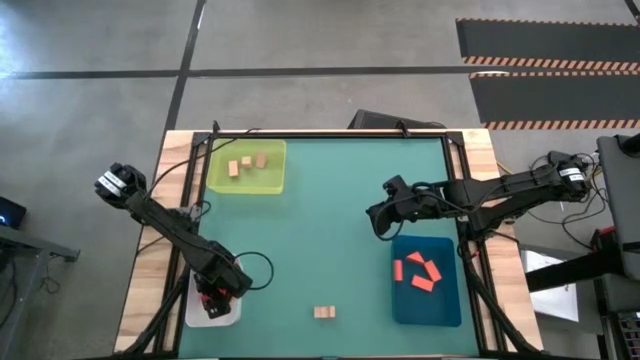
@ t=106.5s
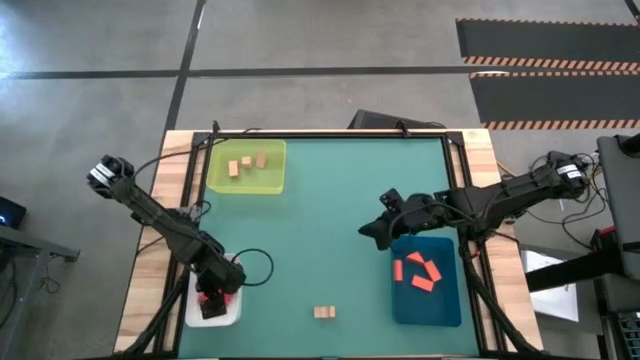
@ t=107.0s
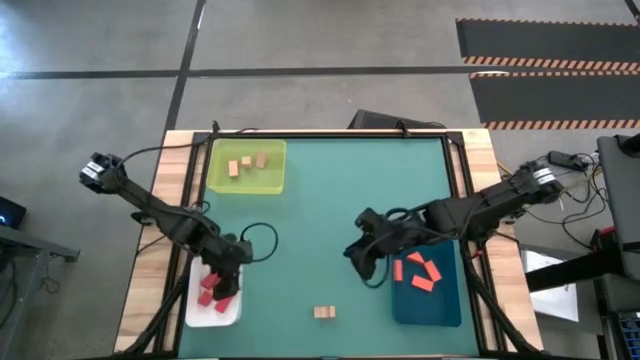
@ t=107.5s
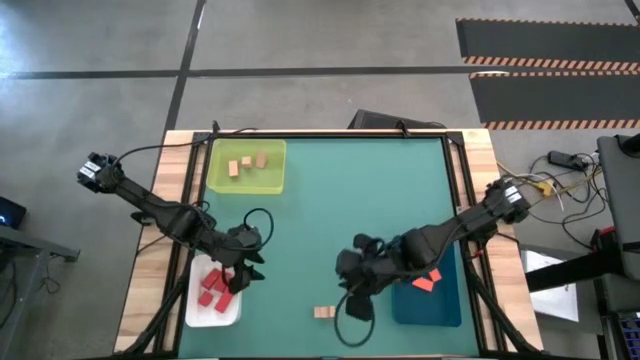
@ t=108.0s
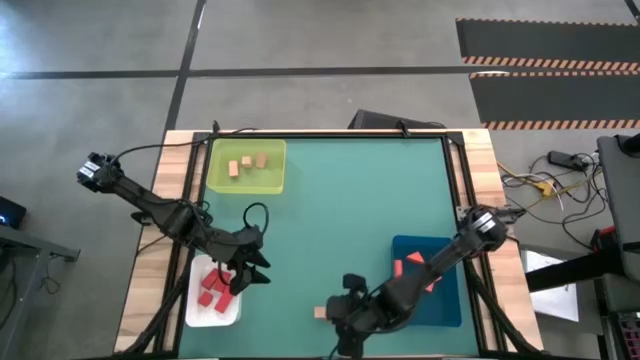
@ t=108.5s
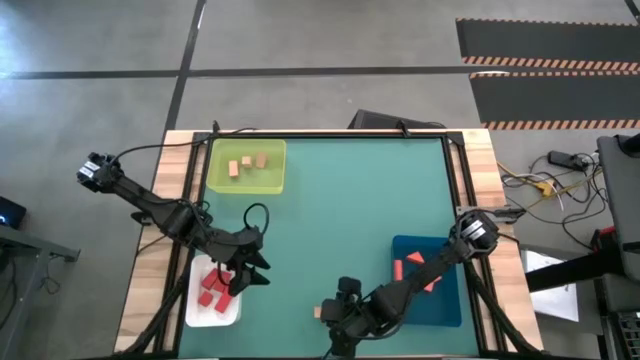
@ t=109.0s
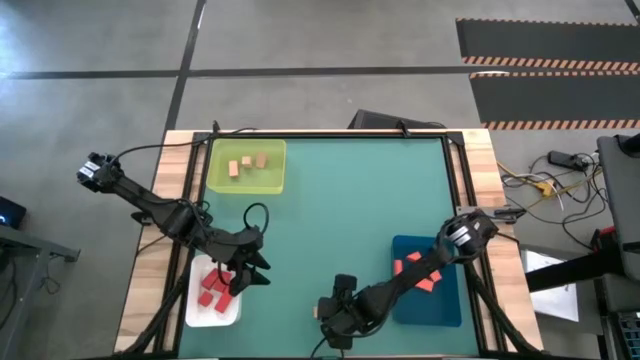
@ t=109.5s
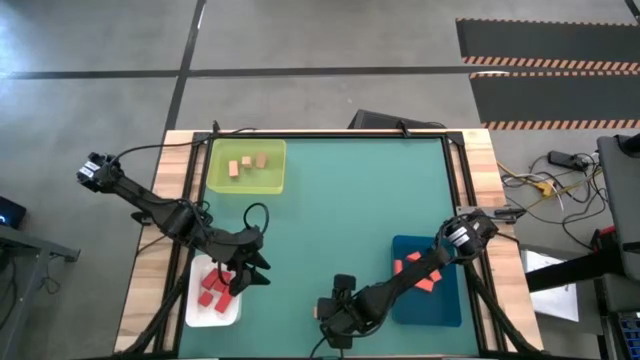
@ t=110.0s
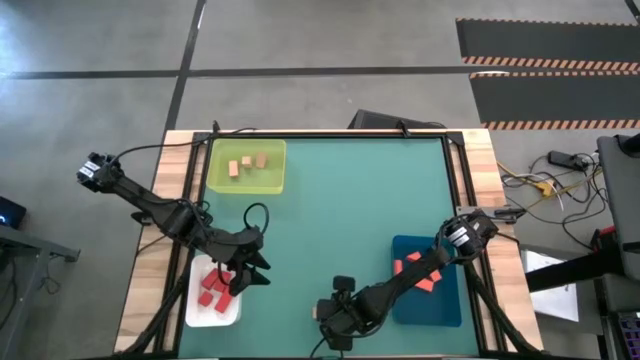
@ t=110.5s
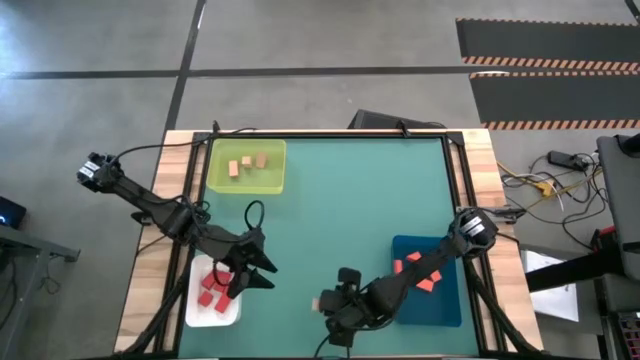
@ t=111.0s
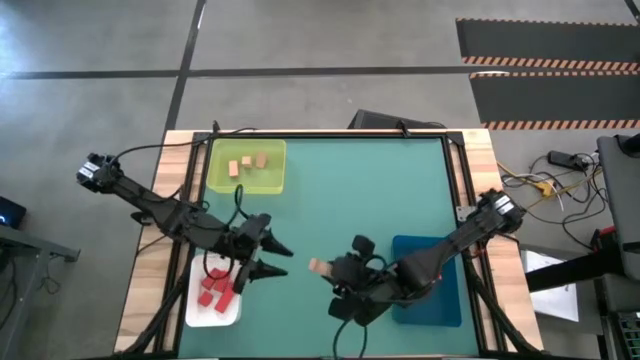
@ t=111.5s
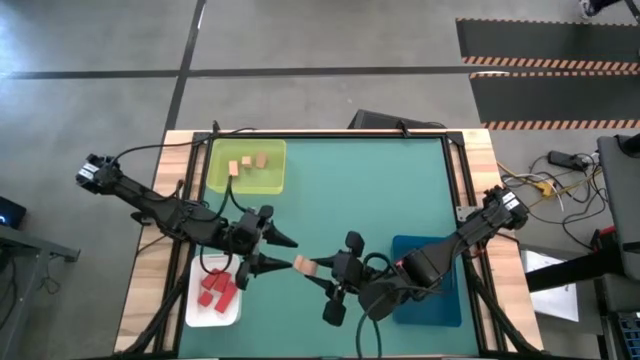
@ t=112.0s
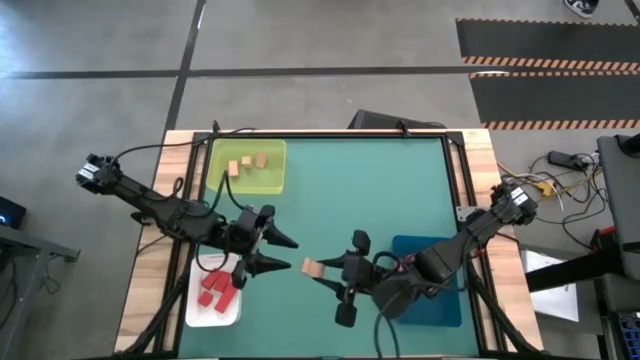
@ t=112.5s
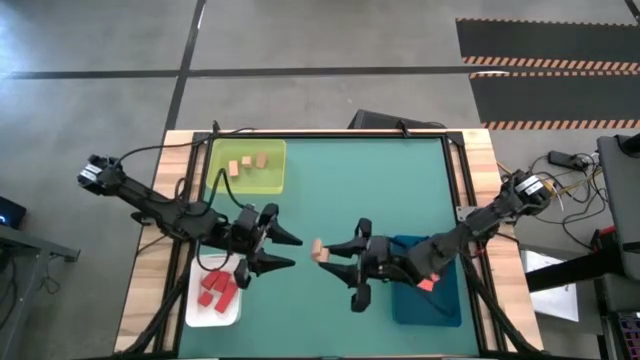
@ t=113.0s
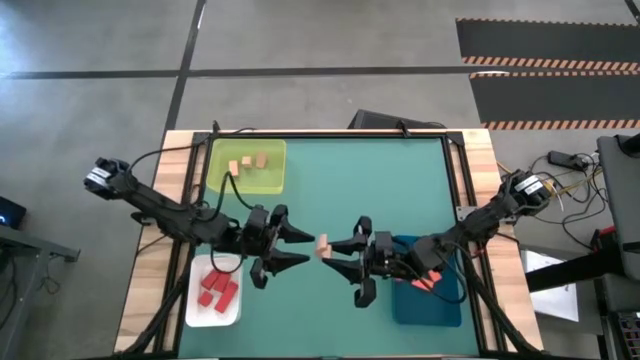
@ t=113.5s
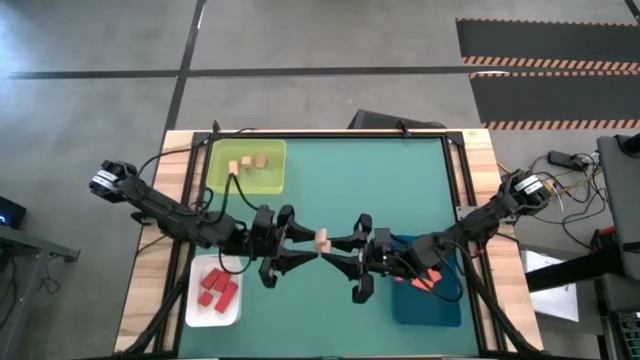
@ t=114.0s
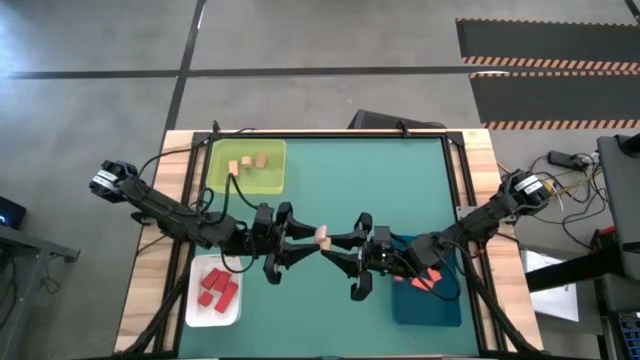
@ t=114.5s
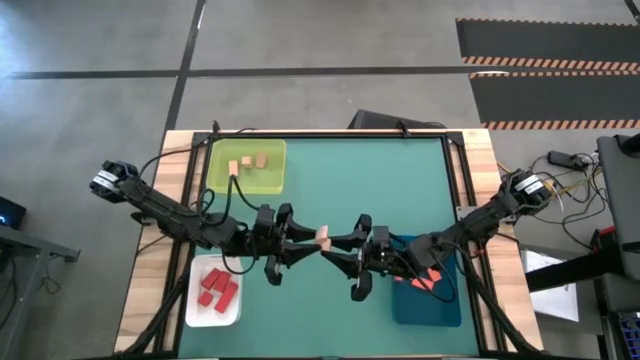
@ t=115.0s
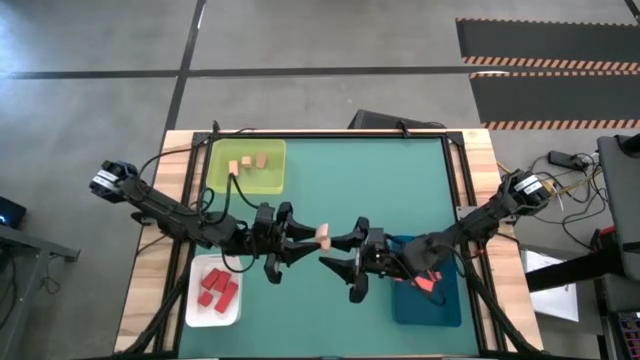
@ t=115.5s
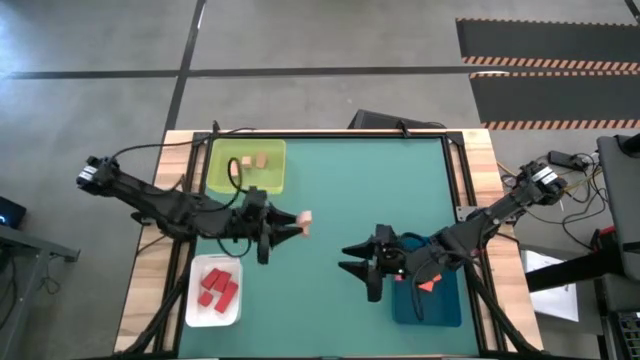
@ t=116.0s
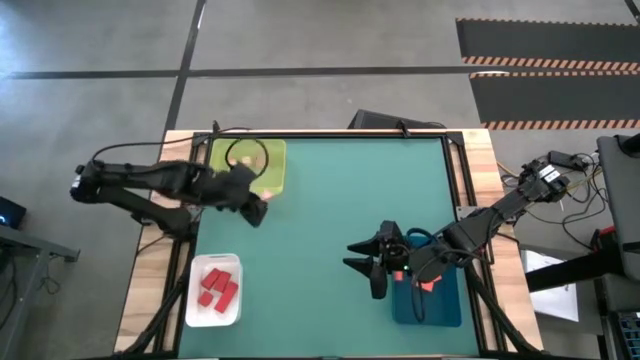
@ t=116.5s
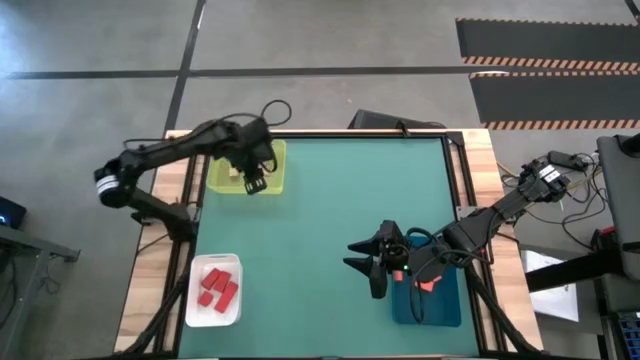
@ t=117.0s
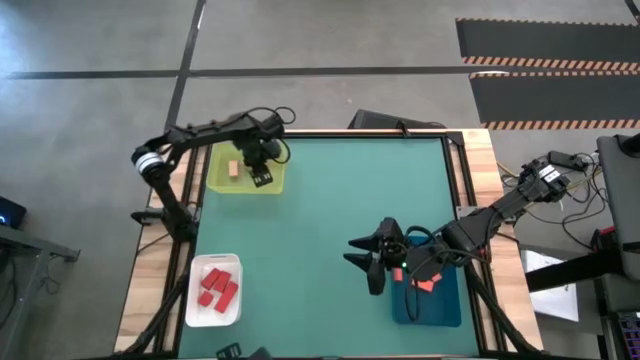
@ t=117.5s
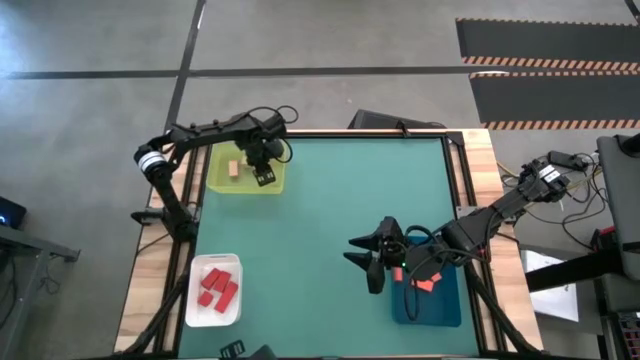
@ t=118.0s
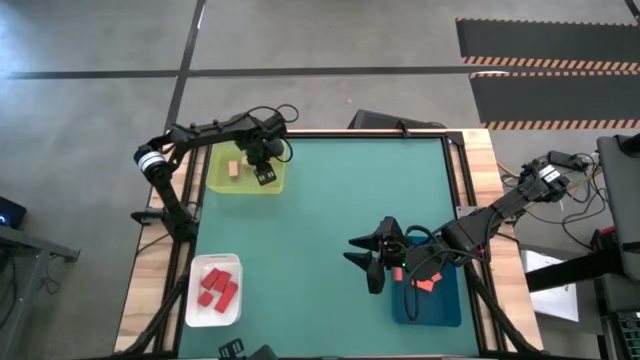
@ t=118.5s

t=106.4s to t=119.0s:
Task: Sort & place blocks by color
Put the light brown into the yellow bin

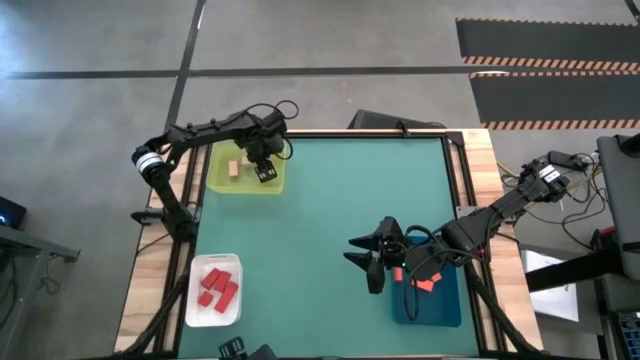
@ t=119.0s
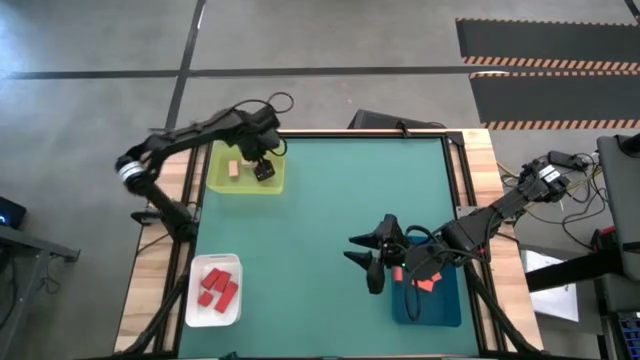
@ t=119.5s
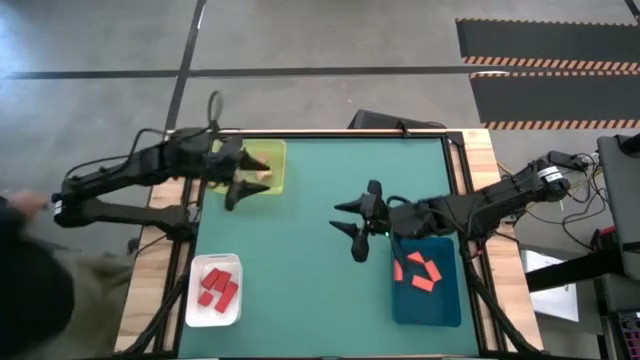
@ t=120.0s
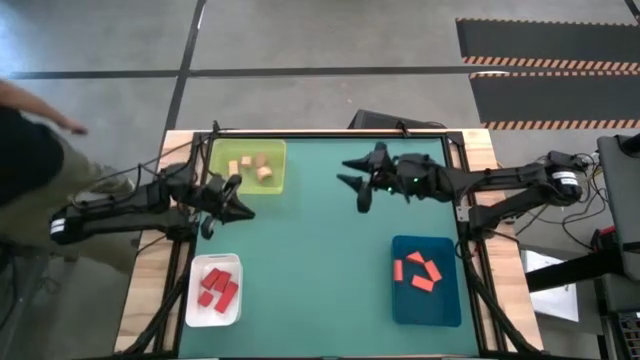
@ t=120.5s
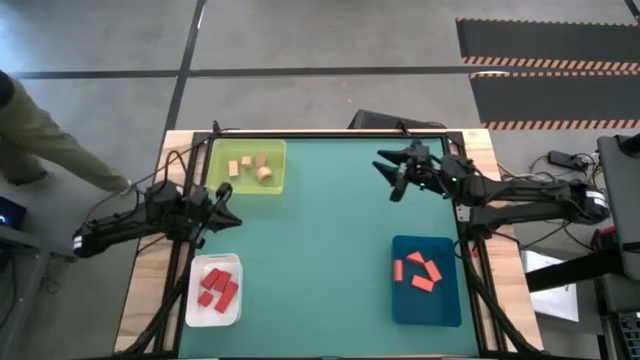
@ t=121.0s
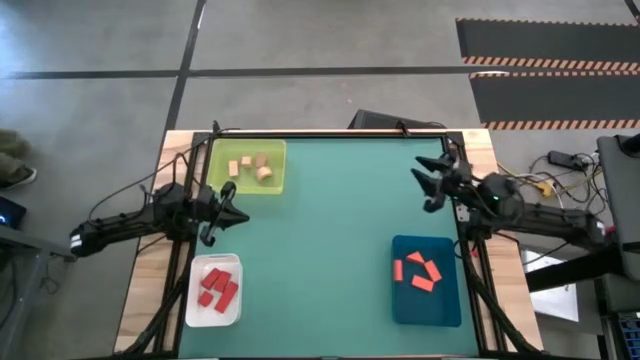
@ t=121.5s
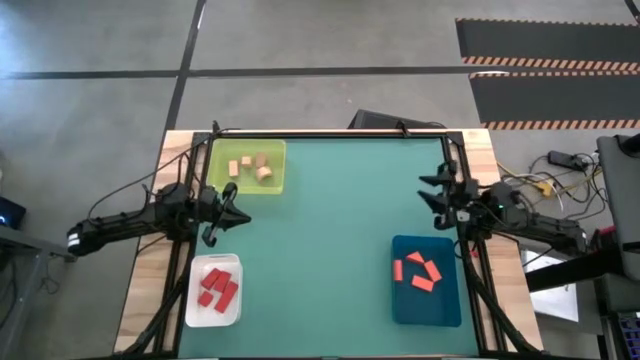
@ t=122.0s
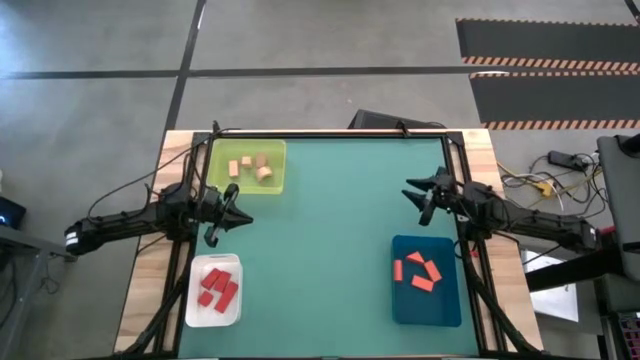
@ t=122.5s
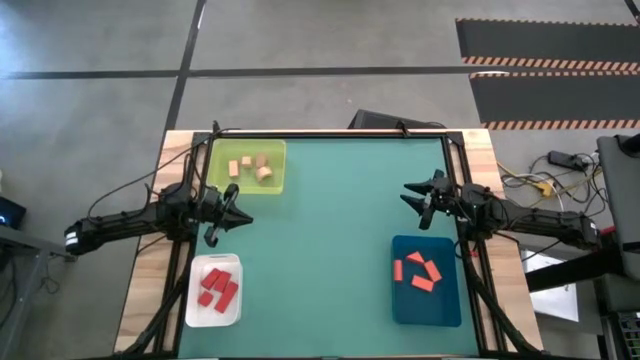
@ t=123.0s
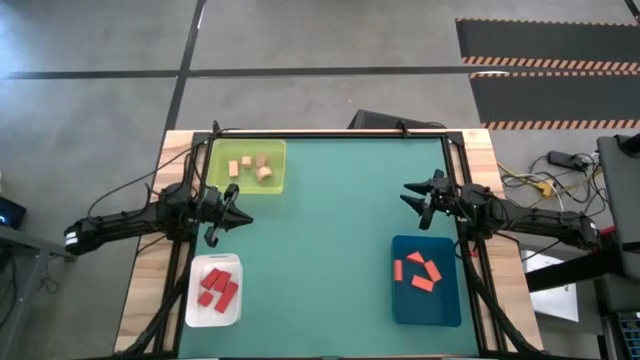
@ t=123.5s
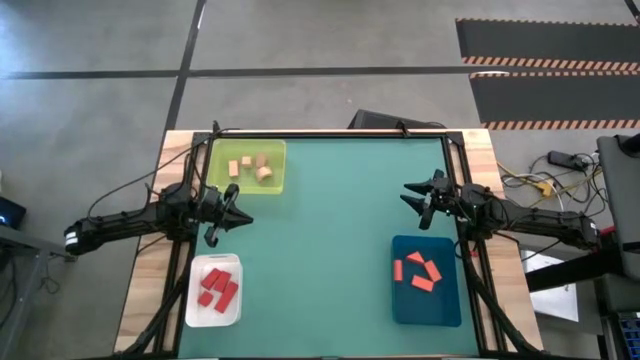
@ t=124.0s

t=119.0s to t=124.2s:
Return to Home Position

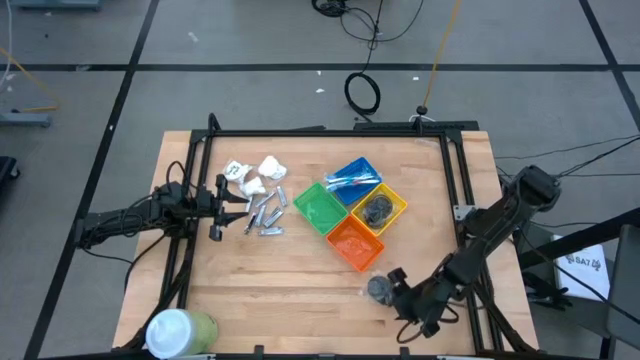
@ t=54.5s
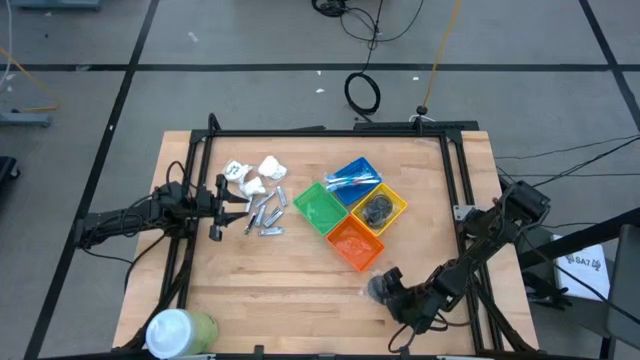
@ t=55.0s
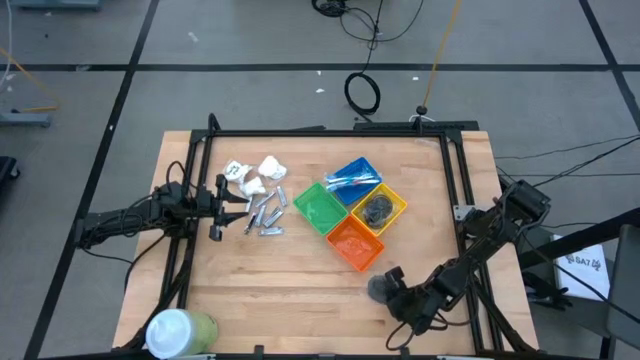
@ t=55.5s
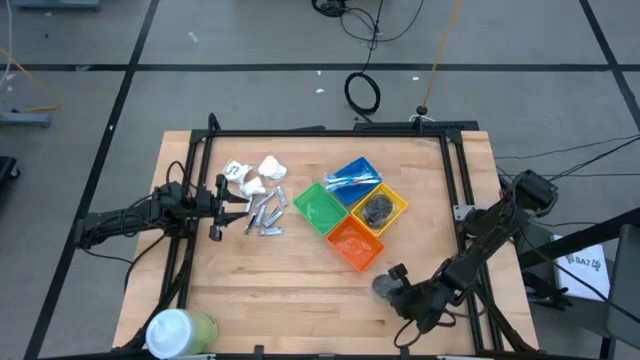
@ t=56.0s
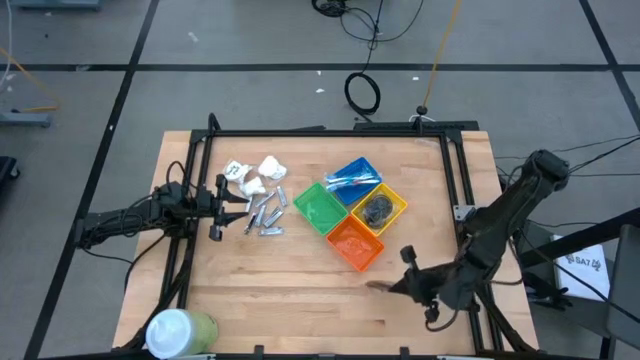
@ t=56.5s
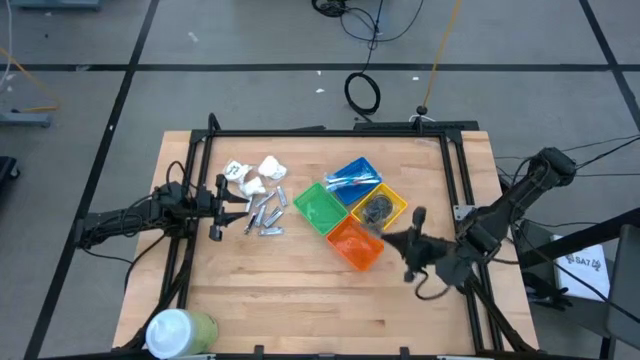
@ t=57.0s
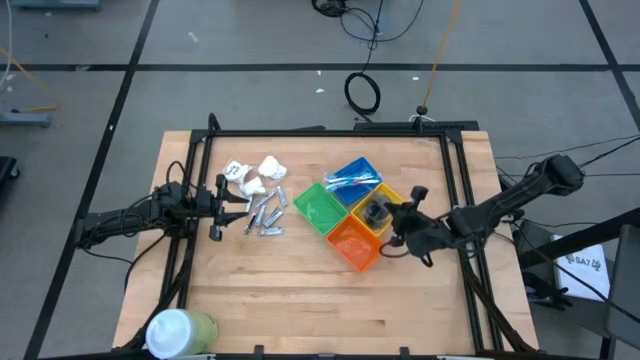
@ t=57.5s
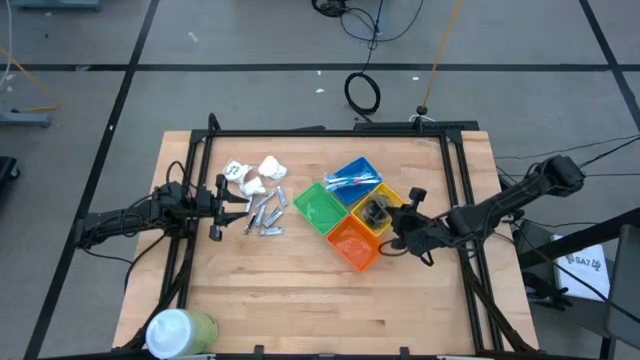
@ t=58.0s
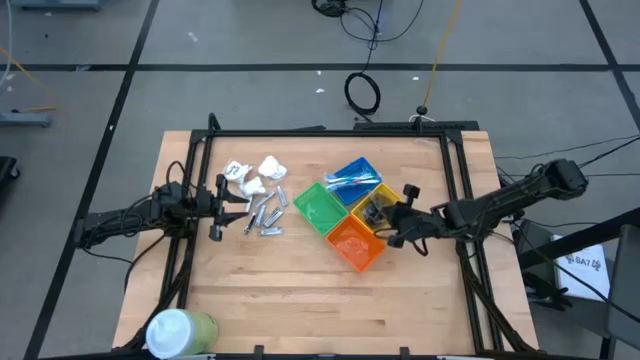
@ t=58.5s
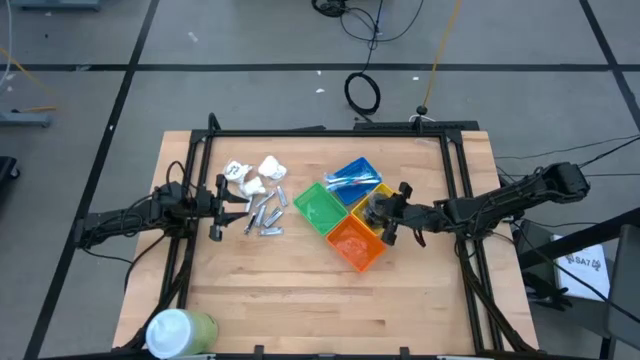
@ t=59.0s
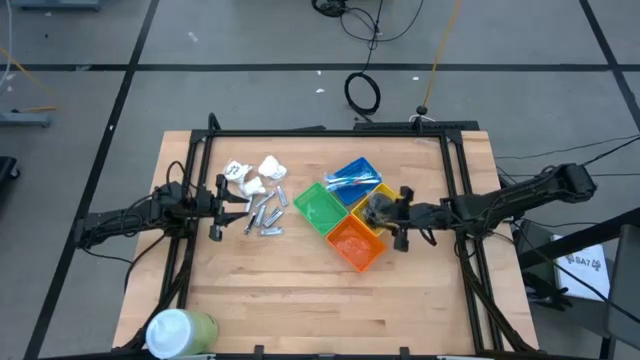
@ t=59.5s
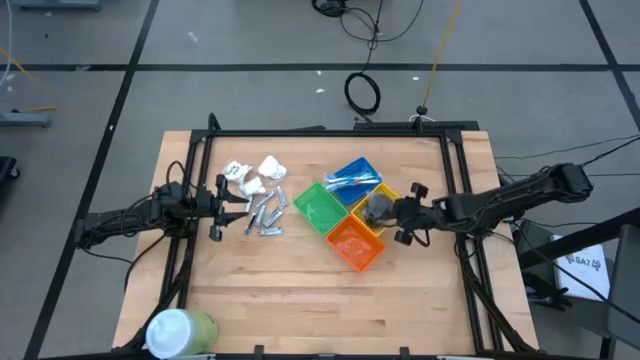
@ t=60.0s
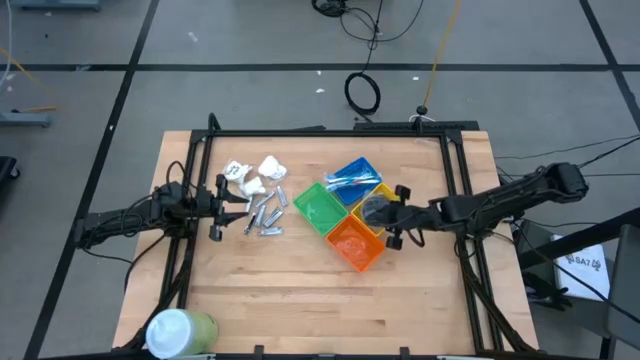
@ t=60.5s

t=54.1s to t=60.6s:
Task: Pick & Place Travel size toiletries
Put the black hairbrush into the yellow bin
